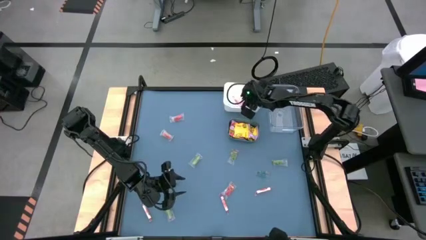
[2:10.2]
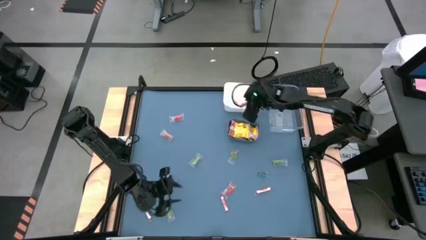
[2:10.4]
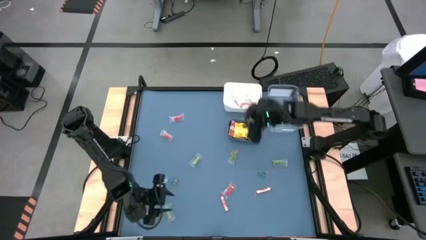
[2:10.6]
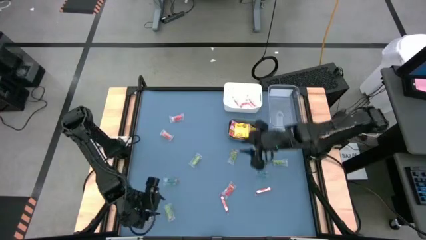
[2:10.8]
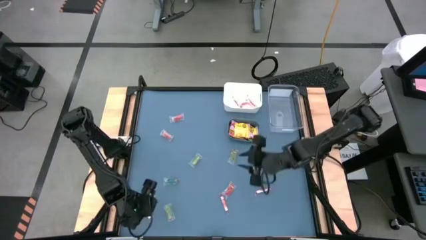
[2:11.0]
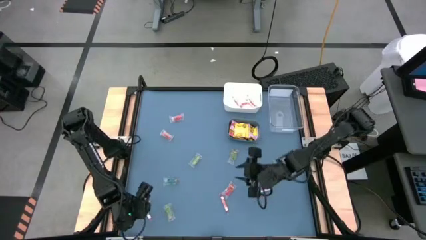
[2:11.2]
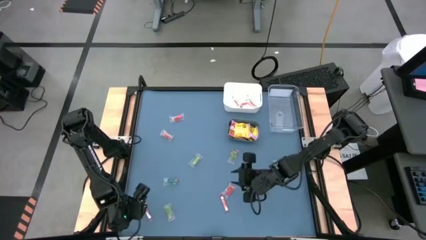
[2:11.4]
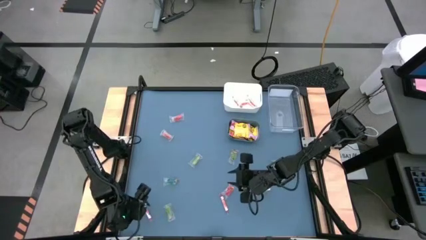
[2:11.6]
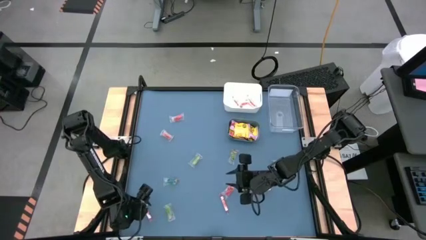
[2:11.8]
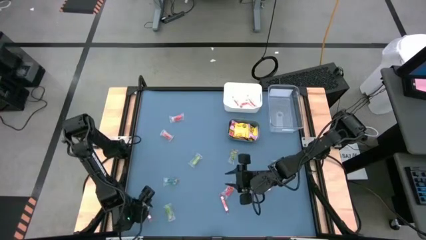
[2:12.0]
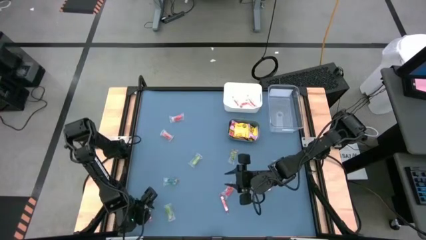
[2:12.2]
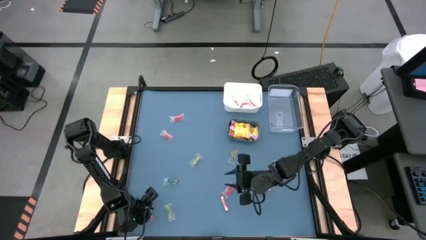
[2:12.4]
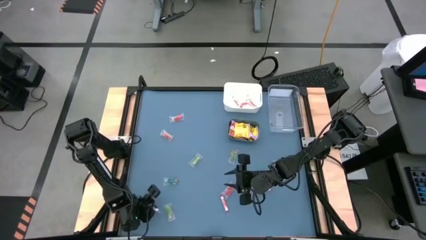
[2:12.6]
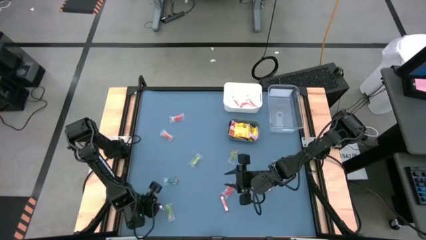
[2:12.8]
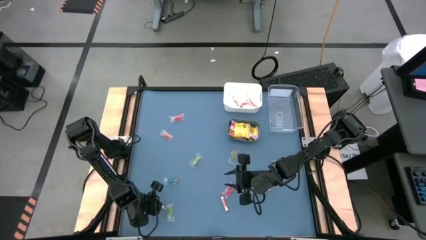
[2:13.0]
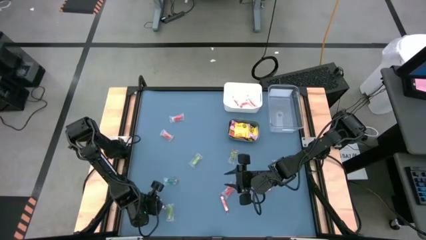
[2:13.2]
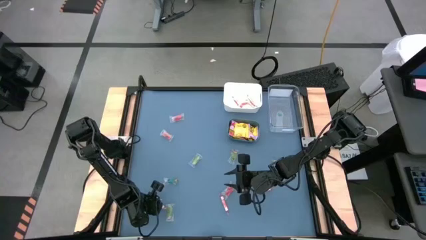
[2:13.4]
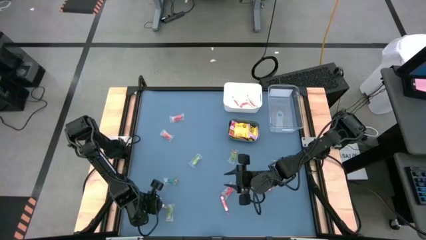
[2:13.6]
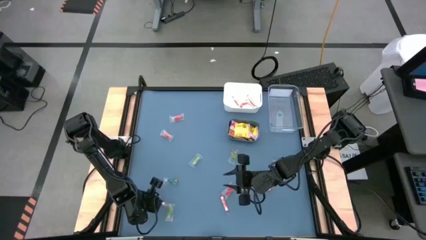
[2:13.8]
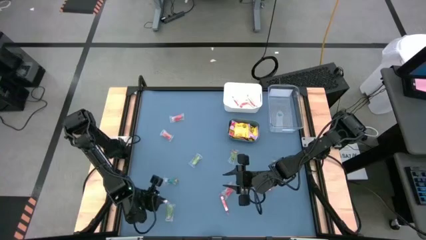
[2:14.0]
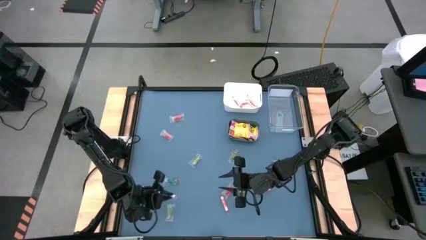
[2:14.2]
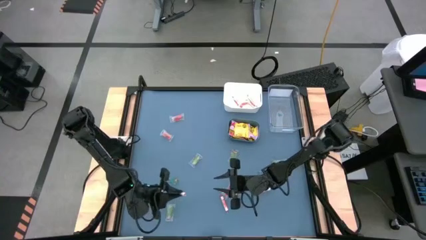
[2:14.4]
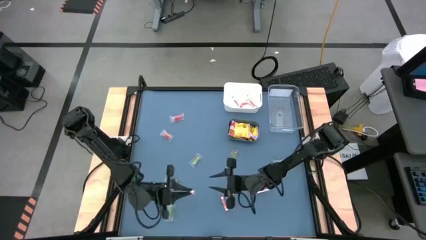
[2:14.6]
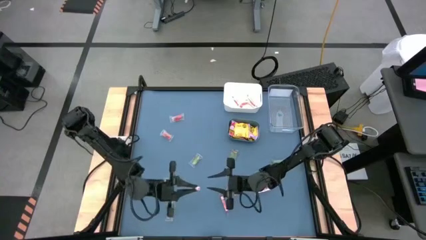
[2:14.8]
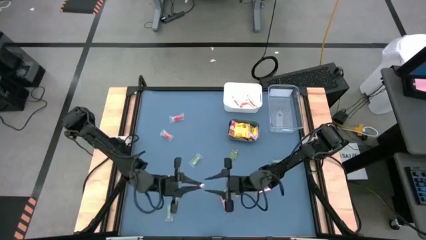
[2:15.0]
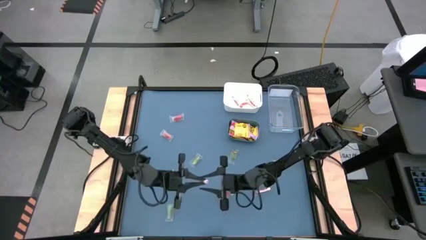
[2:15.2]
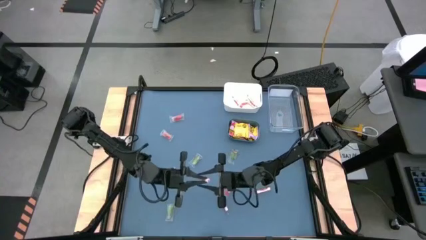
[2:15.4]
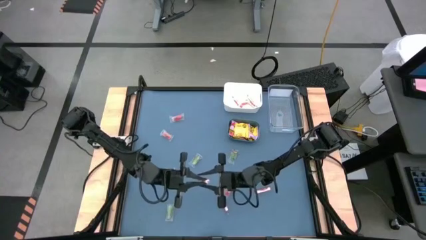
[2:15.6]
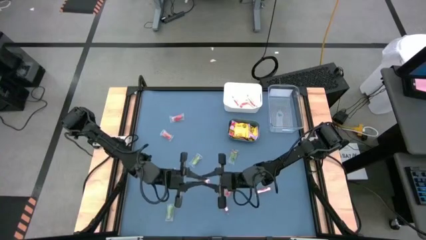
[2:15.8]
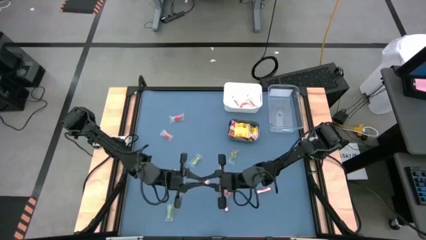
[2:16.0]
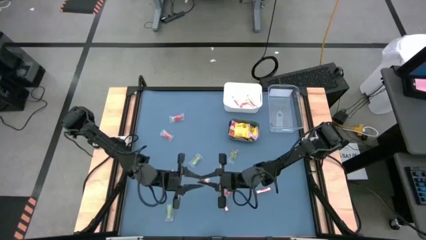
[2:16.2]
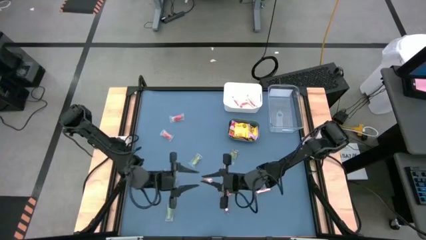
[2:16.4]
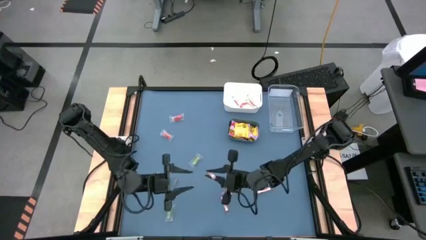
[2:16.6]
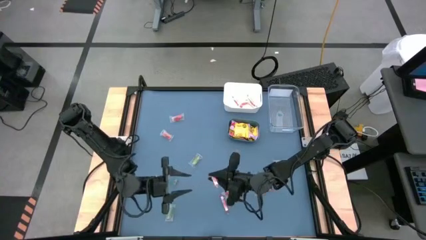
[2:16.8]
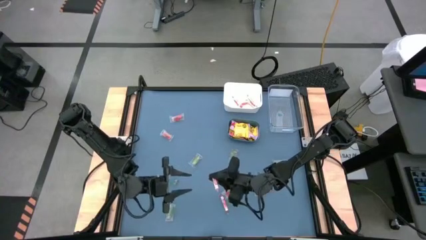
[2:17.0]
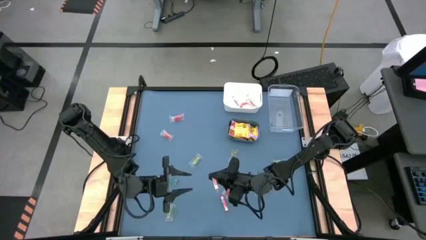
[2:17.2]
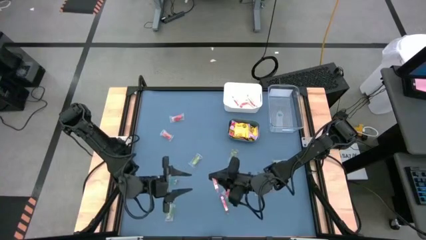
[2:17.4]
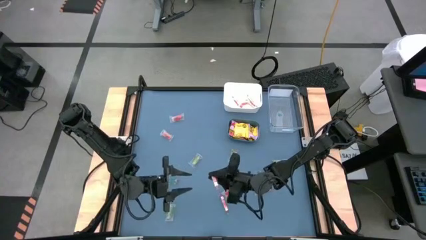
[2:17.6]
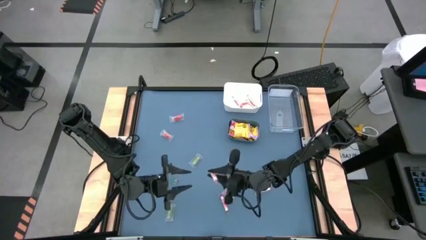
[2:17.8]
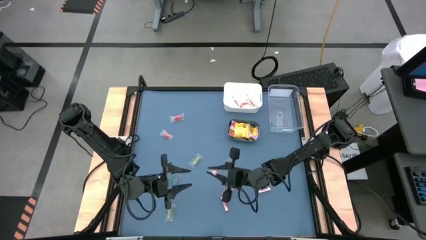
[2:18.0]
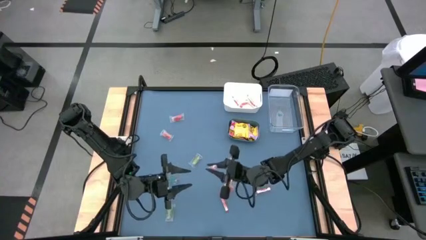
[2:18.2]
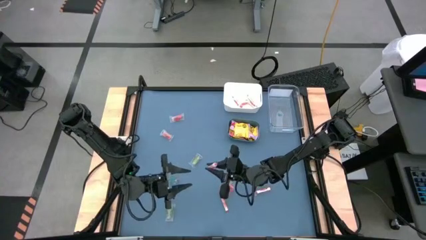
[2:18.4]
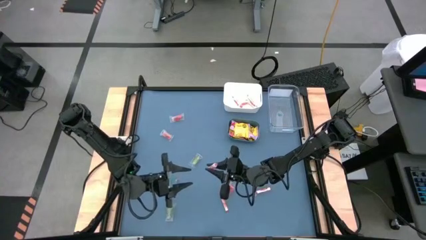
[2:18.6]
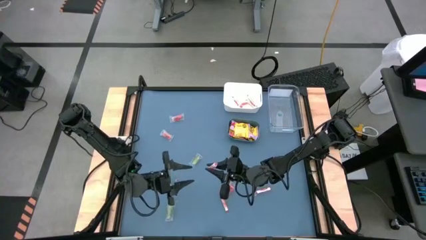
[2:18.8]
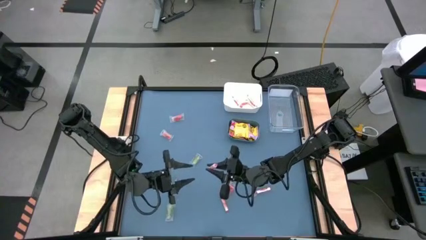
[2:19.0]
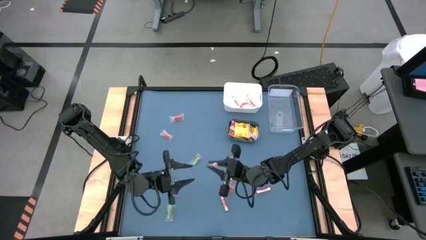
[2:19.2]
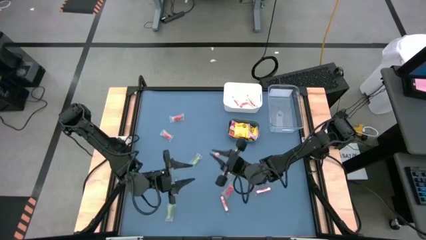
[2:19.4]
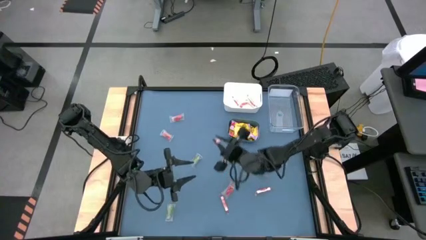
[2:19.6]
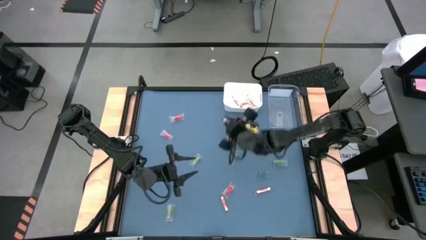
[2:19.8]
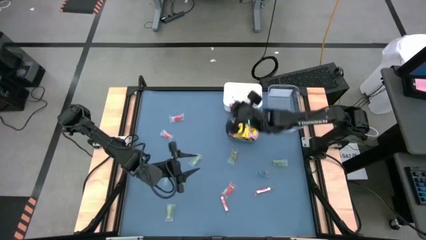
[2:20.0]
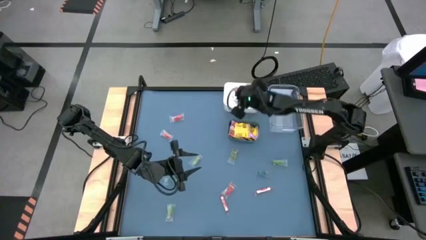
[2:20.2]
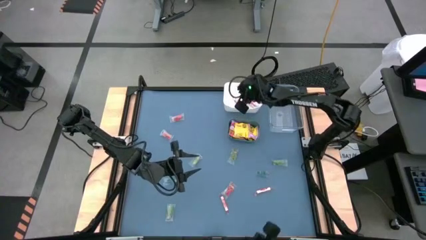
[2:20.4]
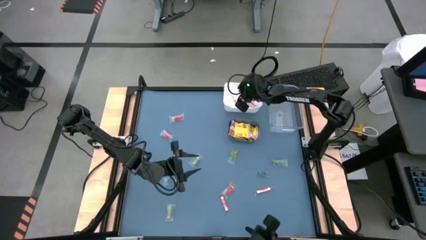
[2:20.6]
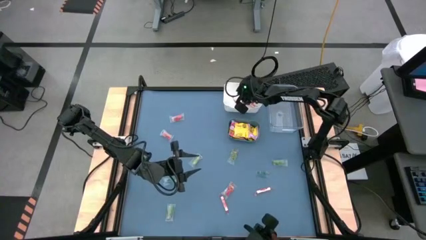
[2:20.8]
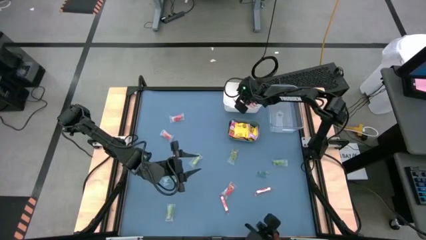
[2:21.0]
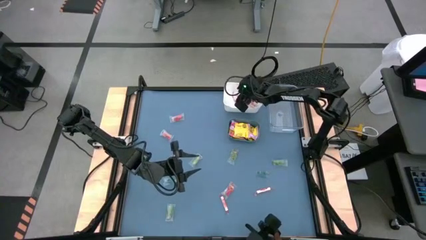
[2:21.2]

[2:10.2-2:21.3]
Task: Sort candy
Put the top left white candy into the white bin

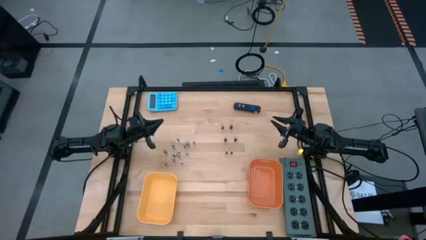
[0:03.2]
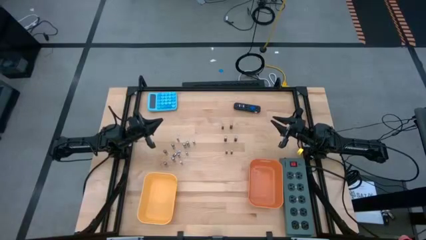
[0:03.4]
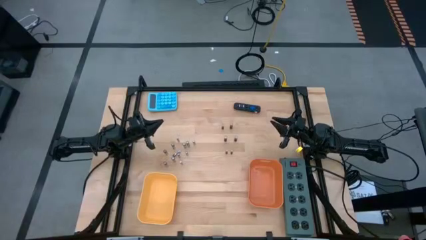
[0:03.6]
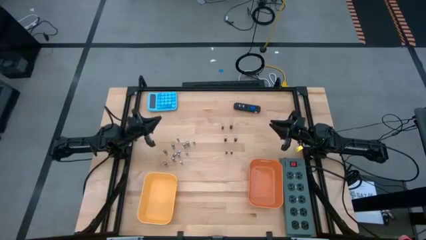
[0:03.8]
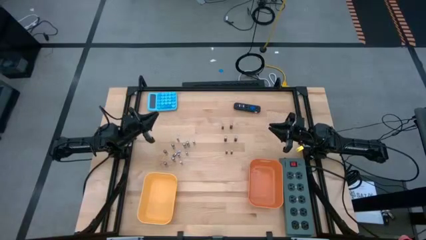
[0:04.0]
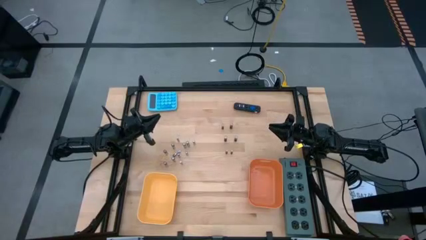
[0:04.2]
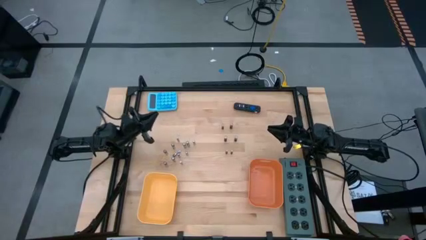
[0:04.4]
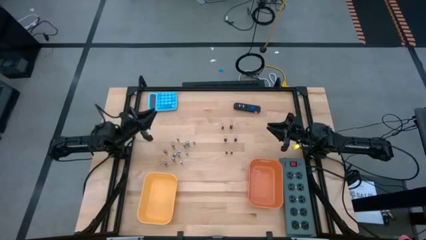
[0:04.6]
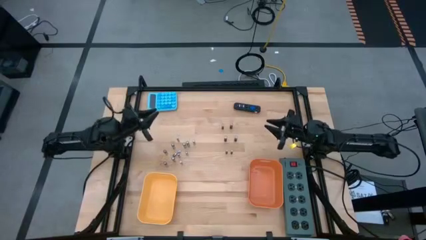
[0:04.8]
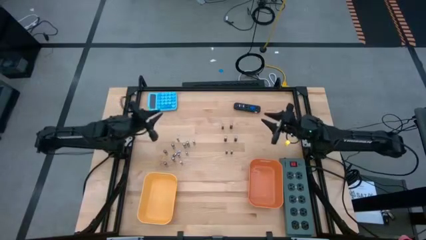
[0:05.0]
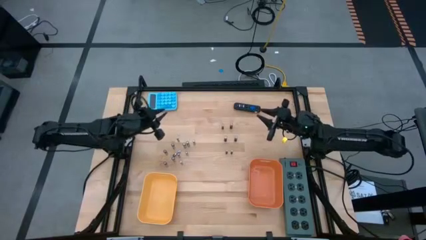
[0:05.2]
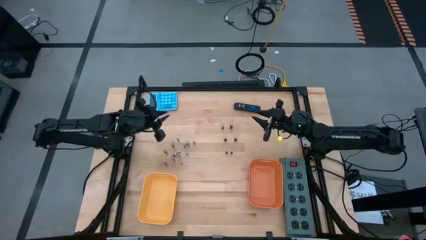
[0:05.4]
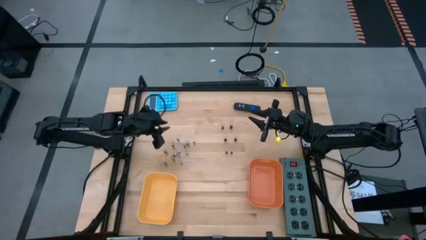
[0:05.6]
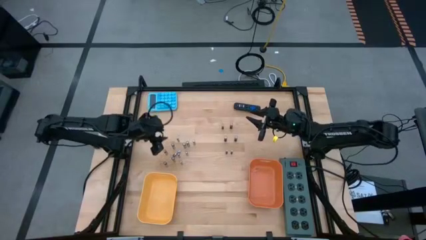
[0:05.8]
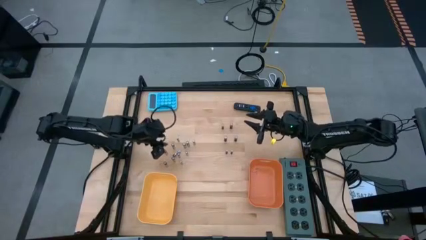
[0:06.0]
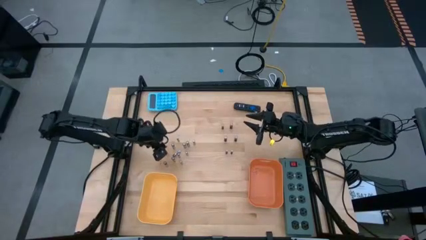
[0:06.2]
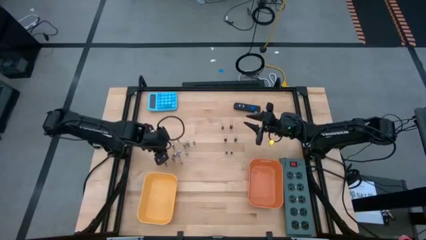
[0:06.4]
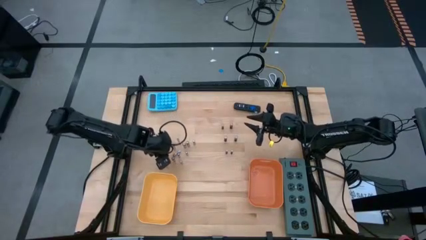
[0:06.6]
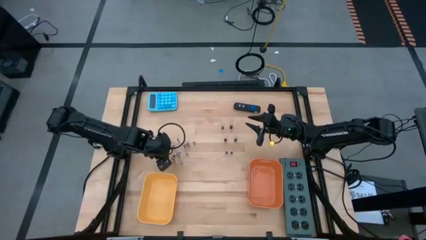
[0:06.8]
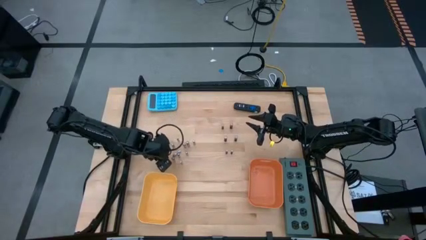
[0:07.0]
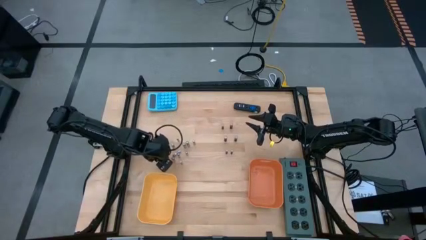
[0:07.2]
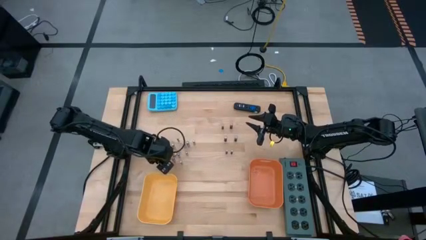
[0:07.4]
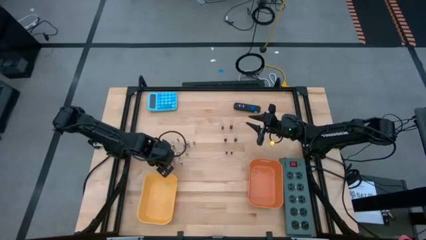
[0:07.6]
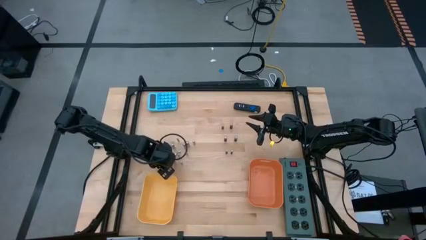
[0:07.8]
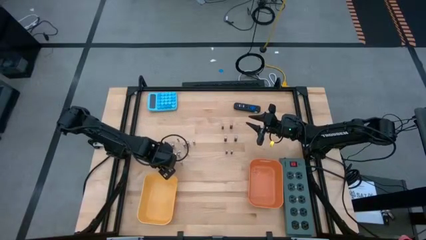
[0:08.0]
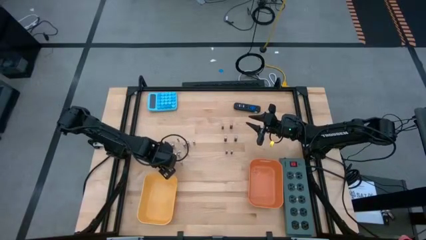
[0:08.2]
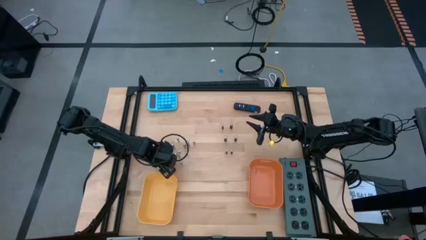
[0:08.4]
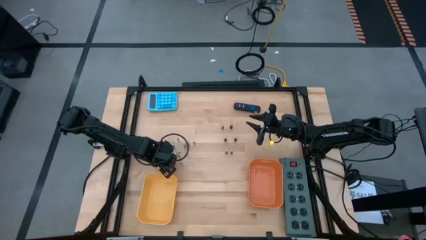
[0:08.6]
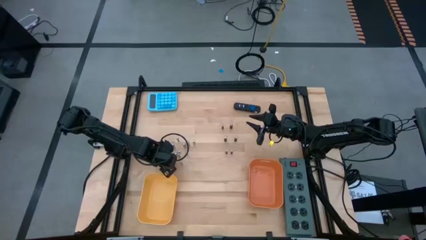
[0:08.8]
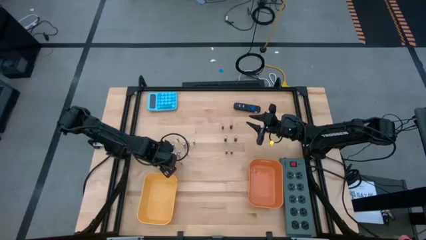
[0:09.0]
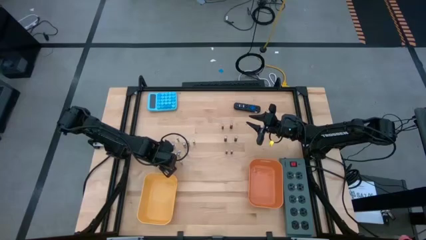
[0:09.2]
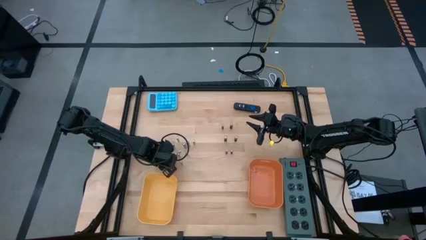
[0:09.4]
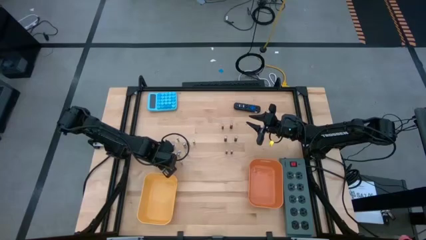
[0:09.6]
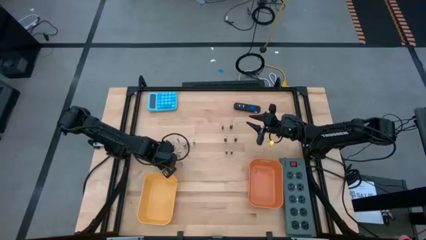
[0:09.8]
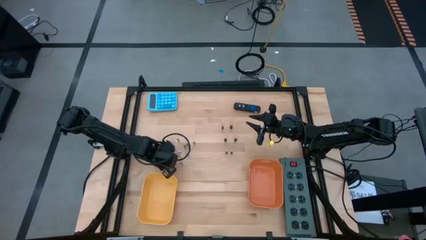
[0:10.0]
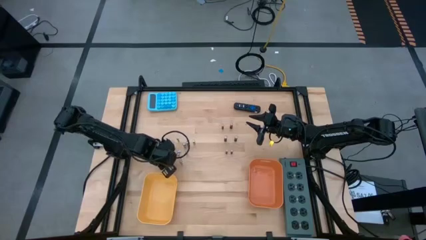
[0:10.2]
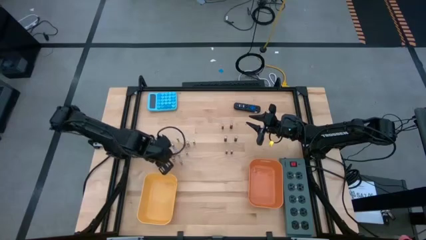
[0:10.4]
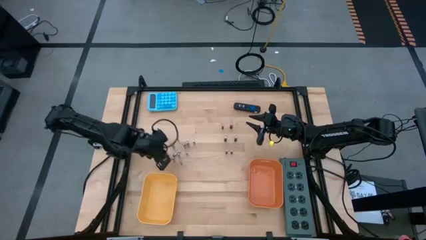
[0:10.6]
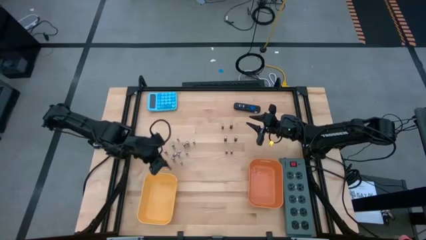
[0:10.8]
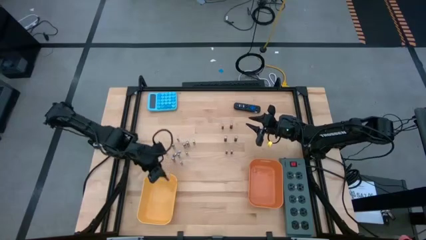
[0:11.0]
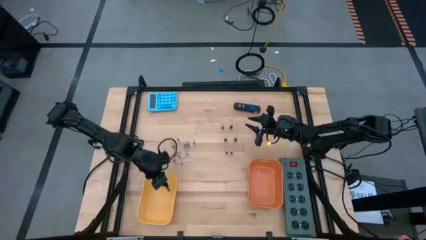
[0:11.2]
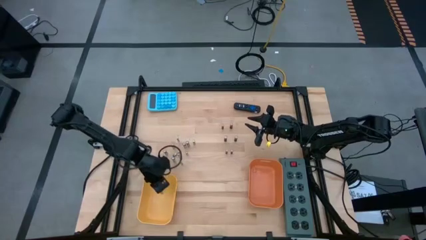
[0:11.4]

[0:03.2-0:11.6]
Task: Sort batteries
Put the silver battery into the yellow bin
